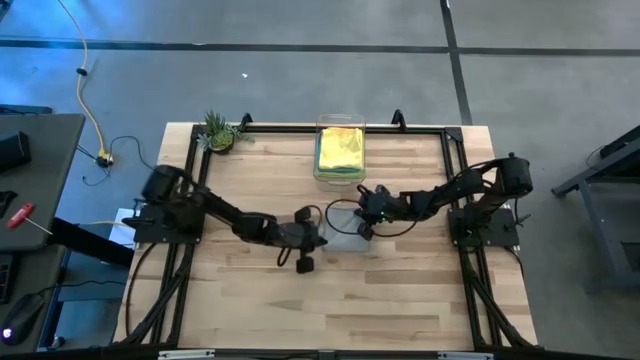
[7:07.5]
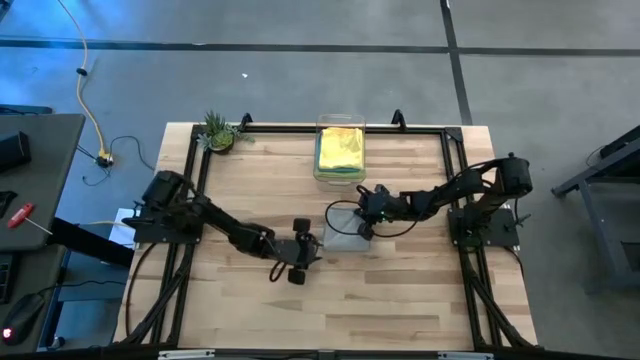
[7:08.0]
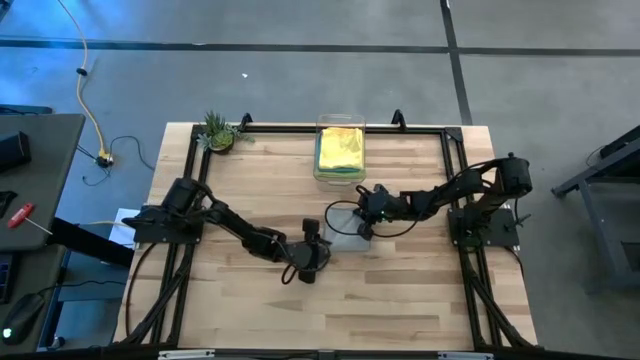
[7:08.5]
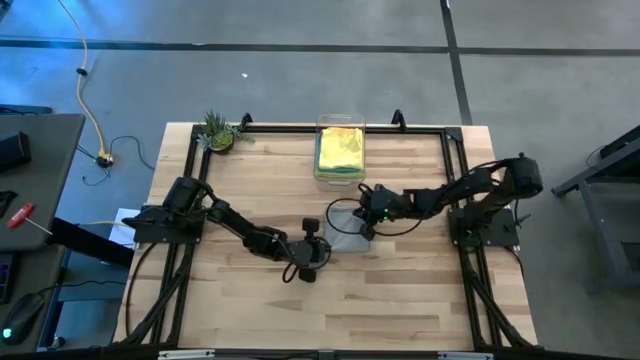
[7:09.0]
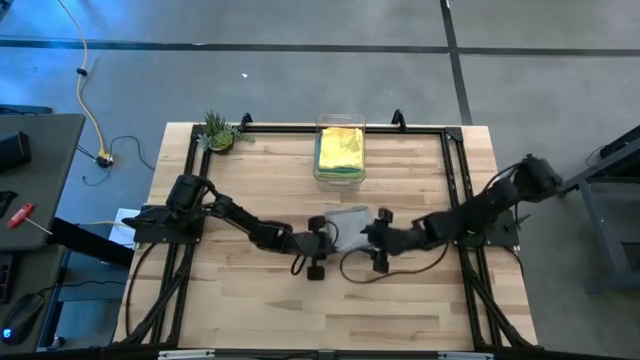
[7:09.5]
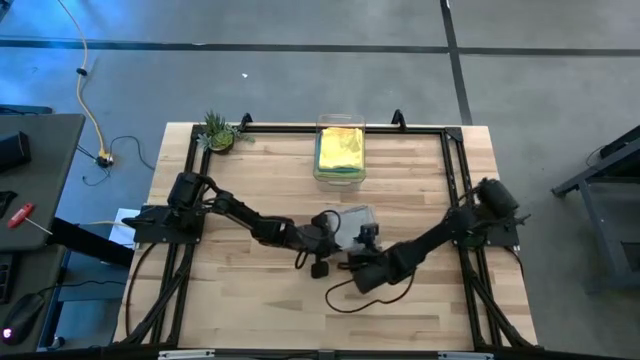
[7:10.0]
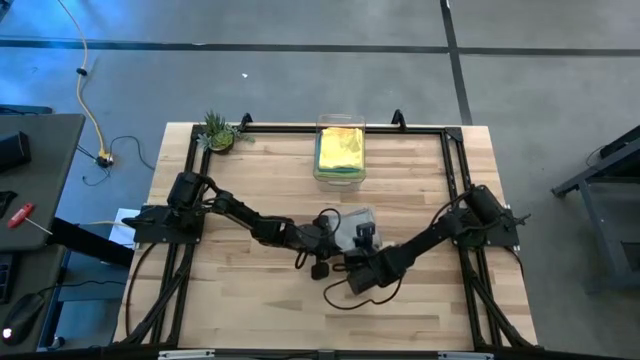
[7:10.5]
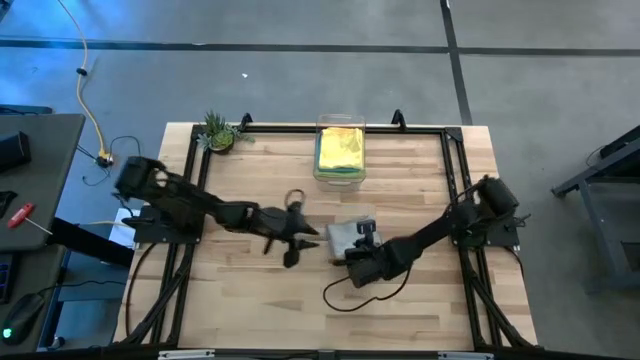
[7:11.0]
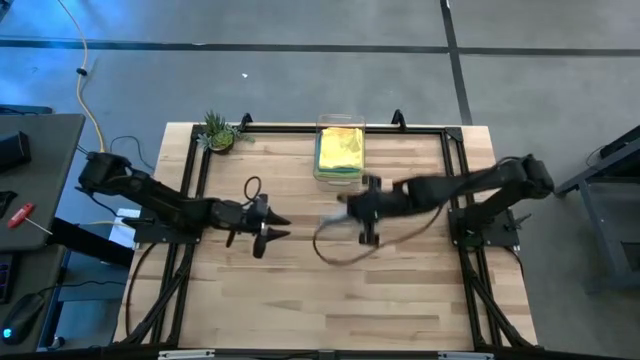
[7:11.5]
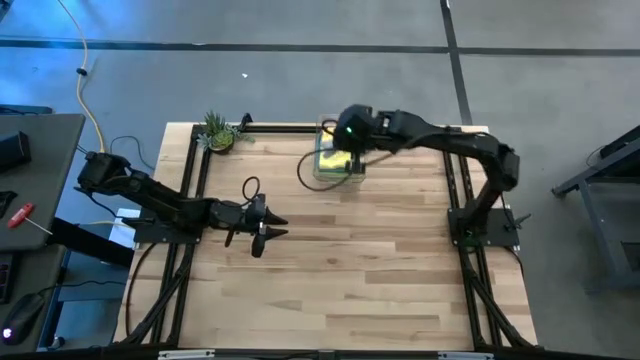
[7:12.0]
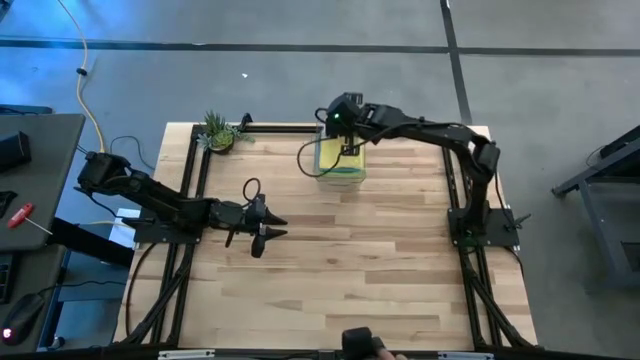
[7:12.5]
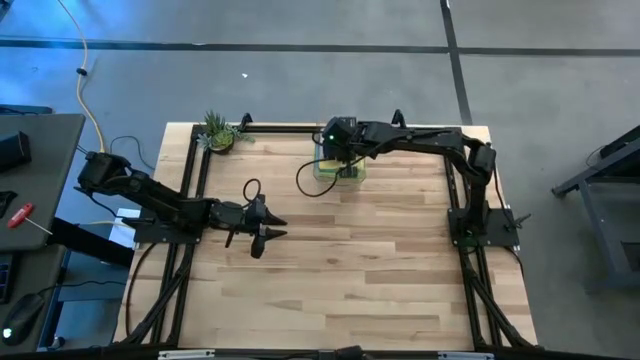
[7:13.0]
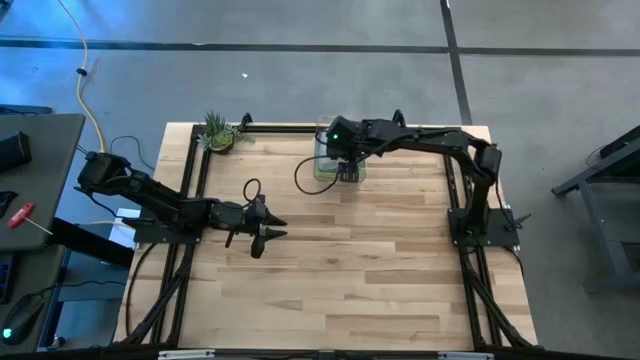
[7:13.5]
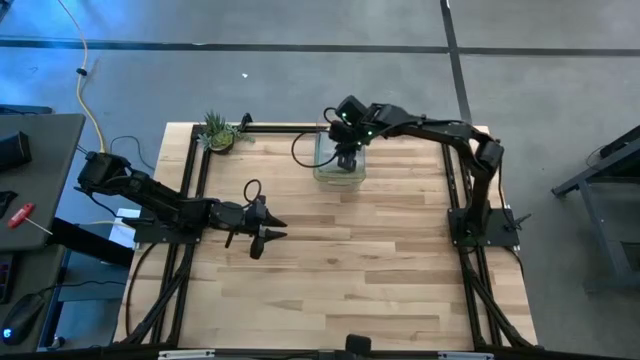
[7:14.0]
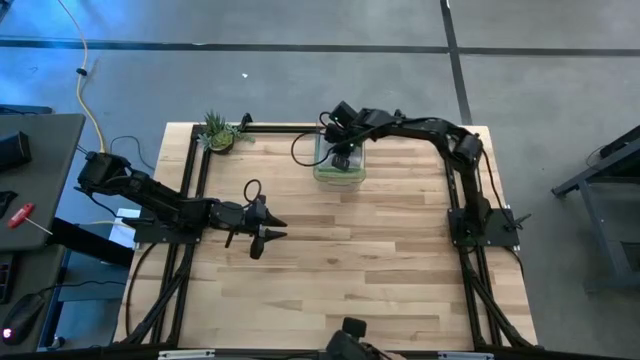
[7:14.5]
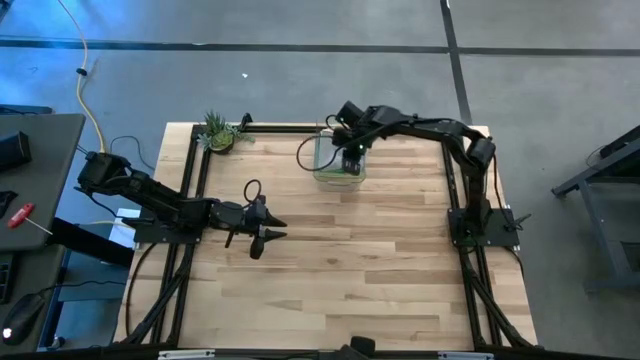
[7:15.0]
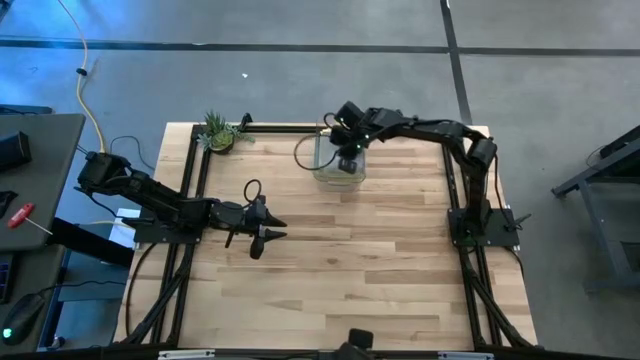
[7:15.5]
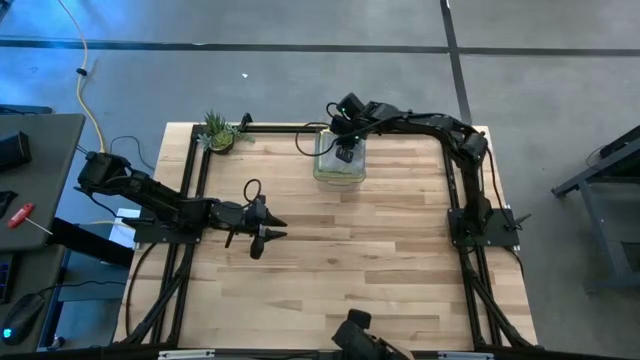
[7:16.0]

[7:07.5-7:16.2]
Task: Fold microfiber towels
Stack the gray microfiber cloth on top of the yellow microfiber cloth in the transparent bin

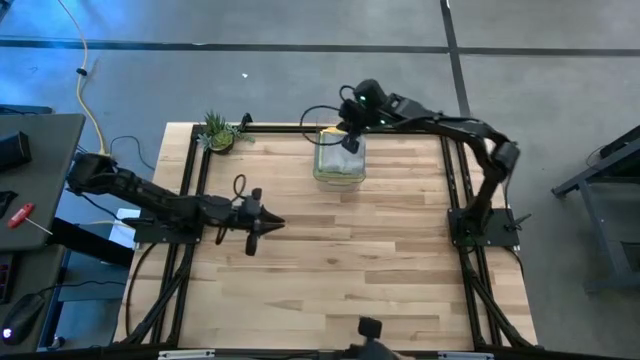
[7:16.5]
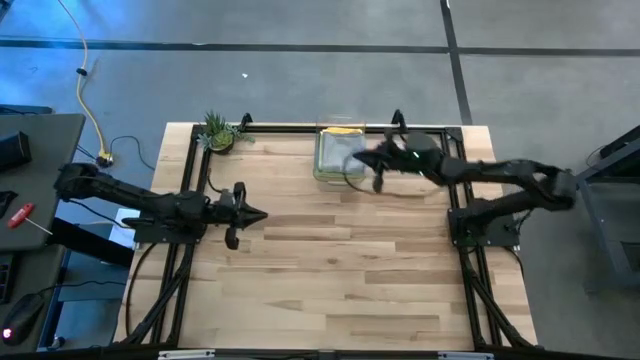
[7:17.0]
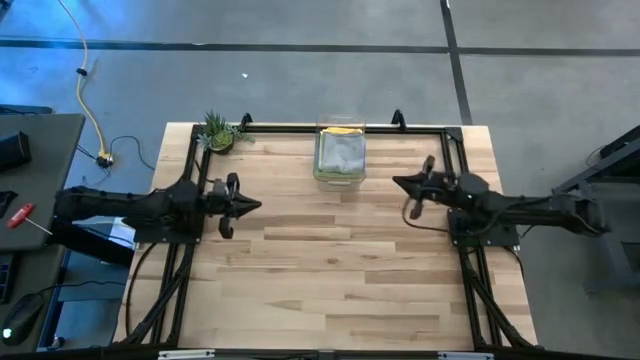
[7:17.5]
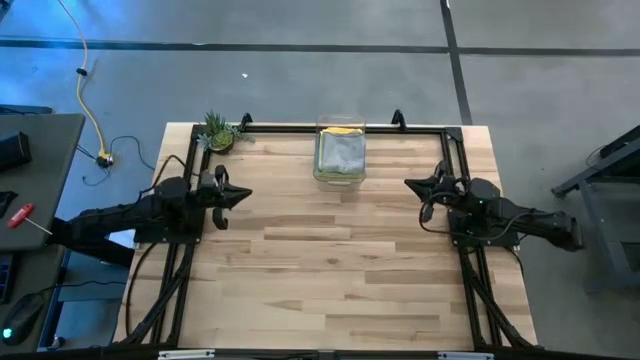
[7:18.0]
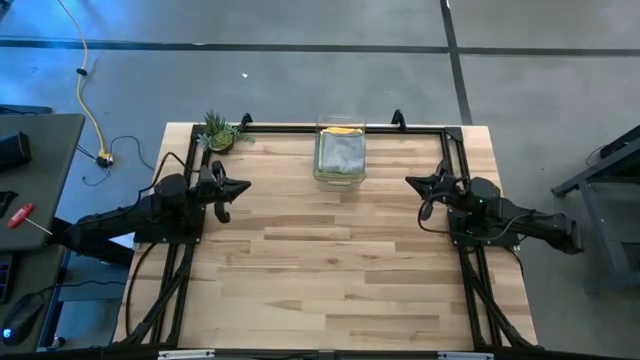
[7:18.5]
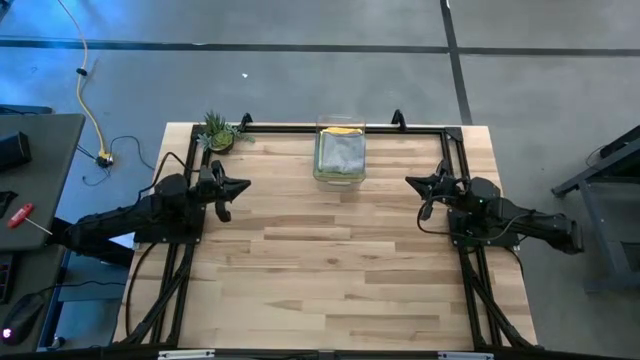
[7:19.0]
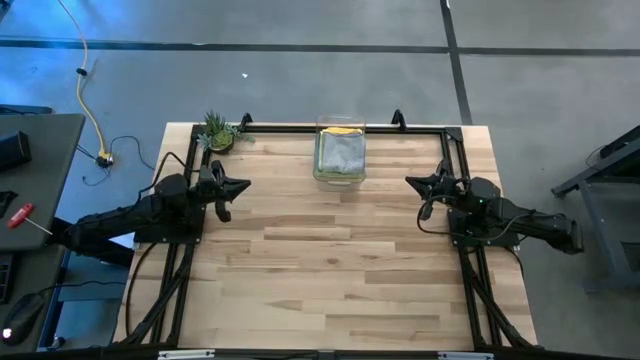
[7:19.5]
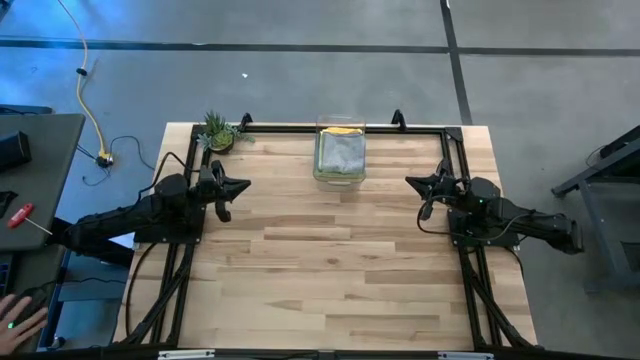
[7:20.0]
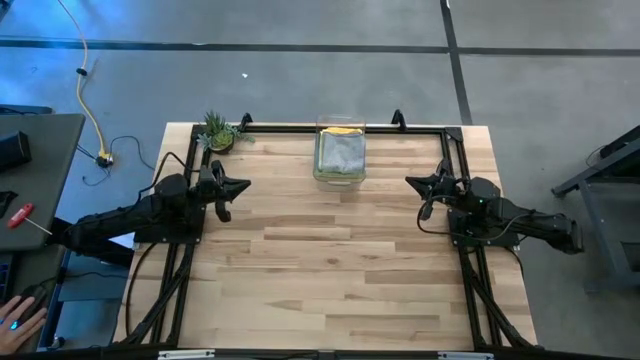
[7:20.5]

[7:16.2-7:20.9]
Return to Home Position

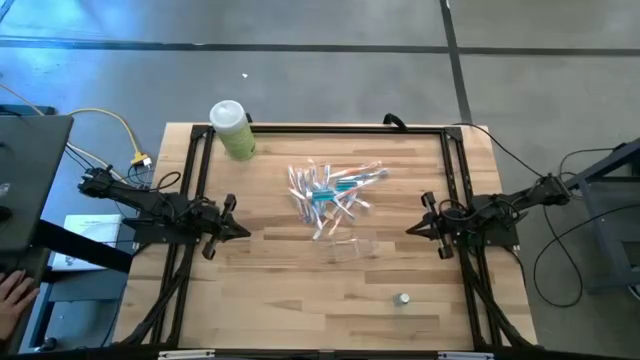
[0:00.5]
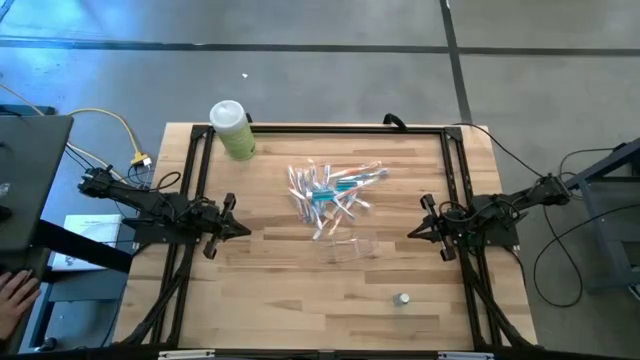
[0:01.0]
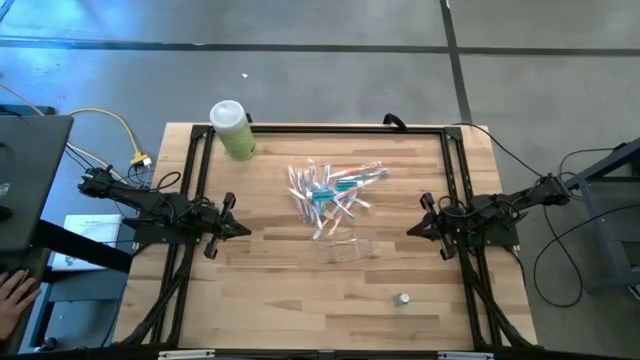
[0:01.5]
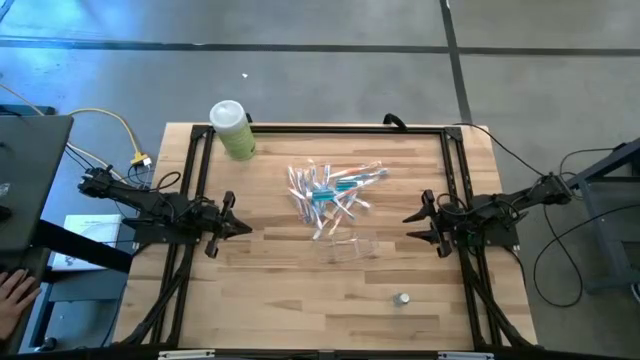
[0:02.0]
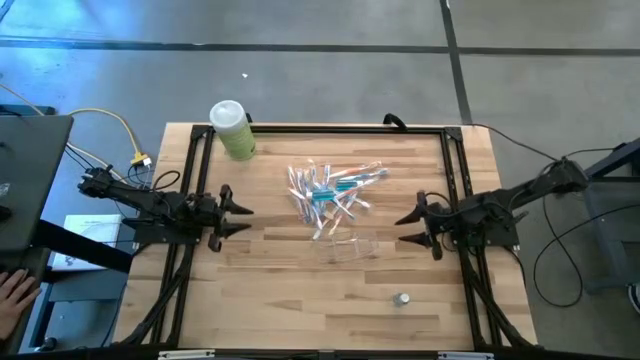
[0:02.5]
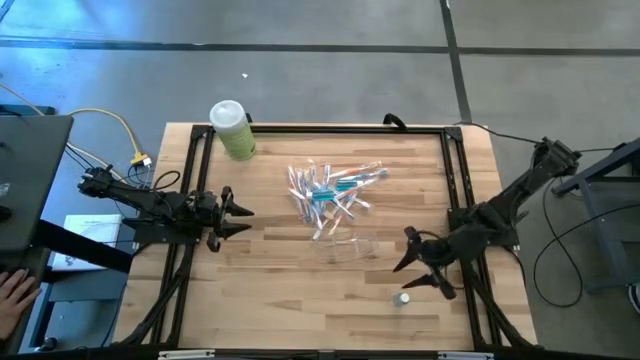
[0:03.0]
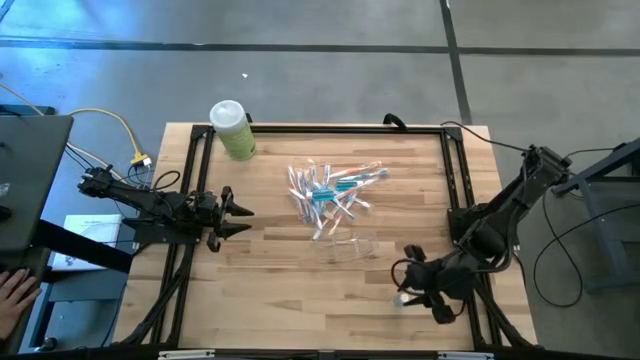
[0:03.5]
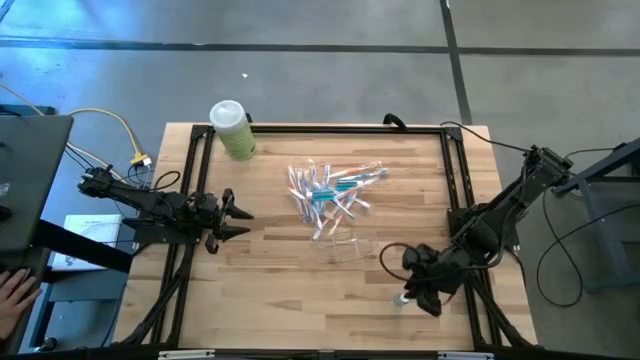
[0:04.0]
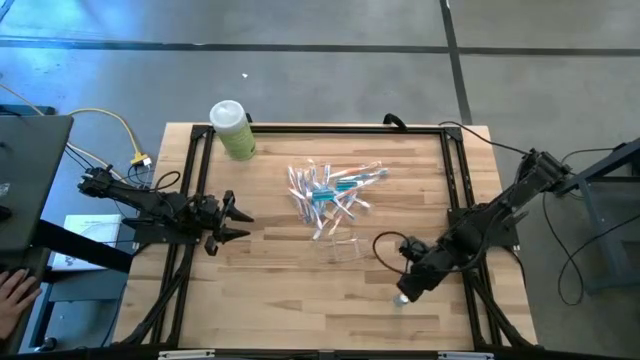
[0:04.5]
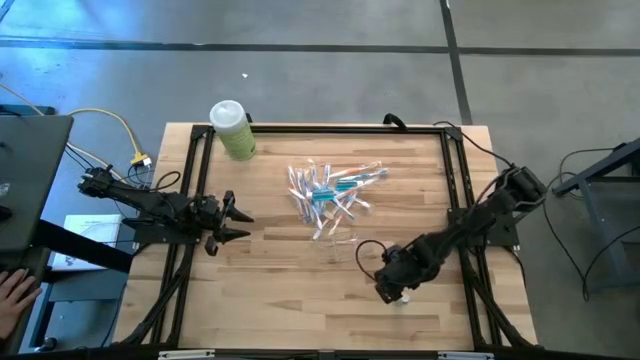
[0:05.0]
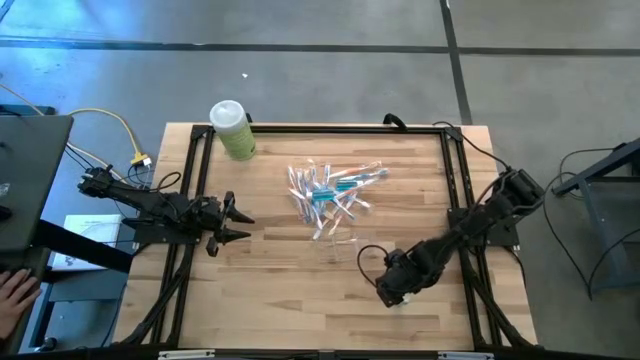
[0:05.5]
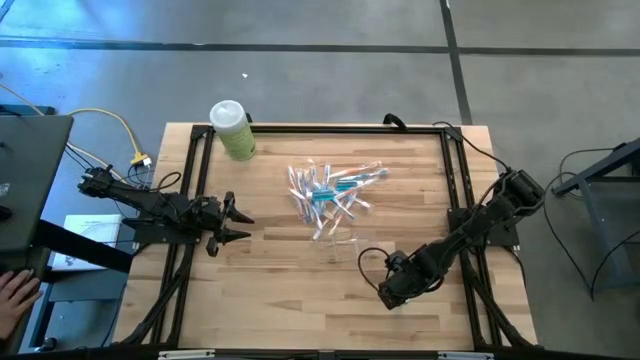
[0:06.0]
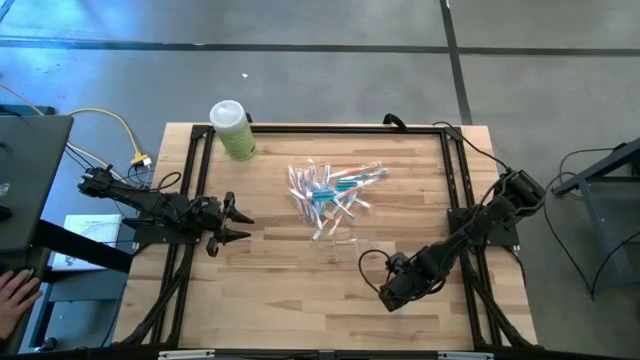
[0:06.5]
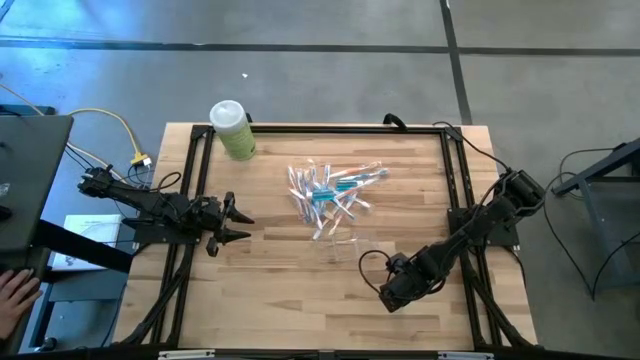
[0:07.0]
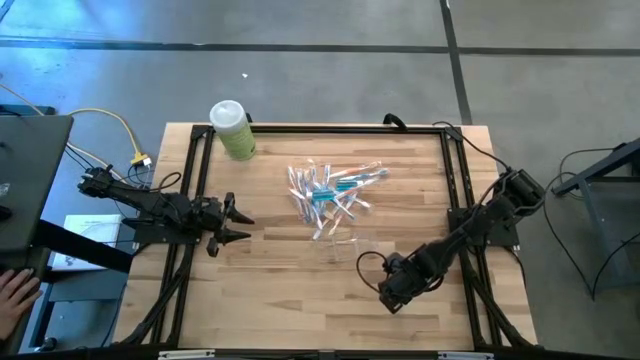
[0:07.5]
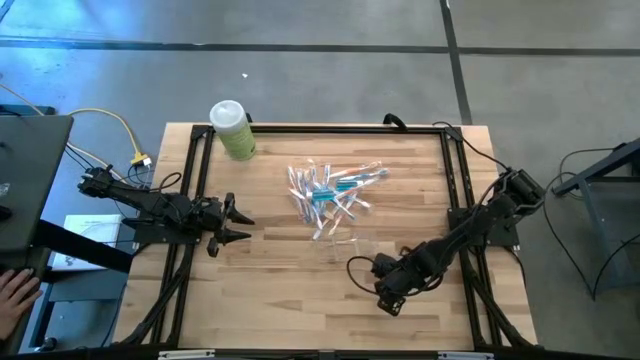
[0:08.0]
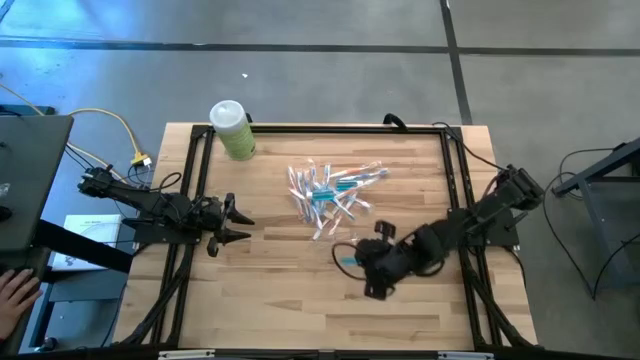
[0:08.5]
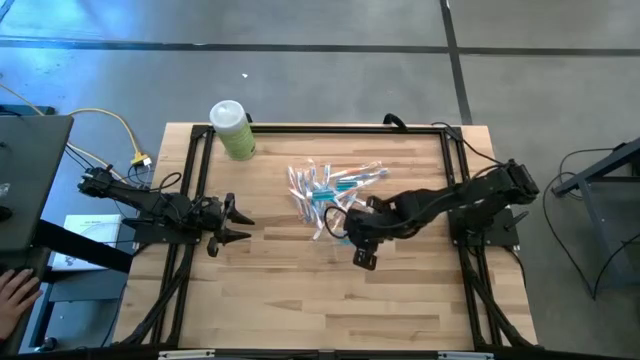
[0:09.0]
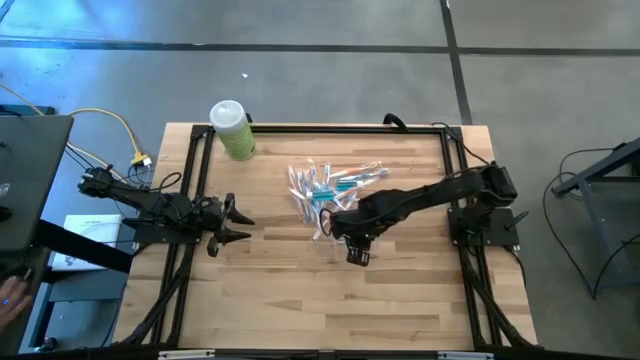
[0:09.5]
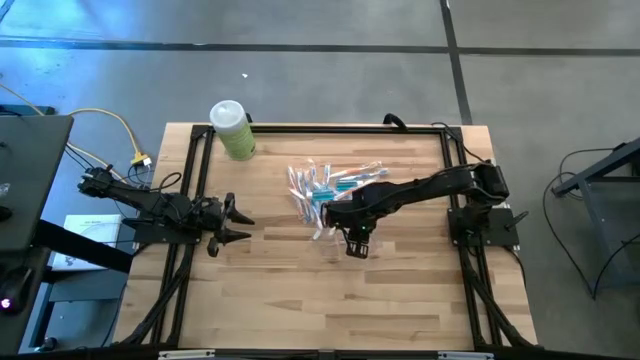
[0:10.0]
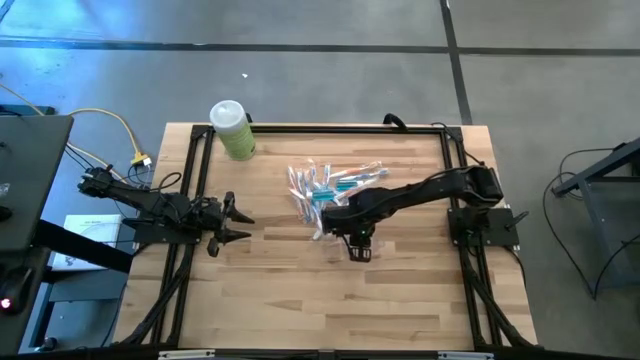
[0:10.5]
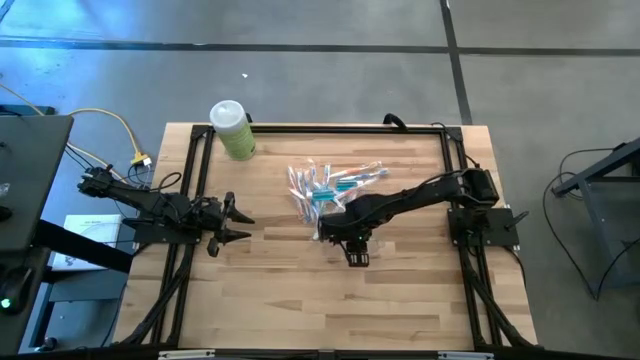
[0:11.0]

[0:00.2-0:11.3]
Task: Pick & Place toothbrushing station
Put the blue mouthwash bottle into the transparent organizer
